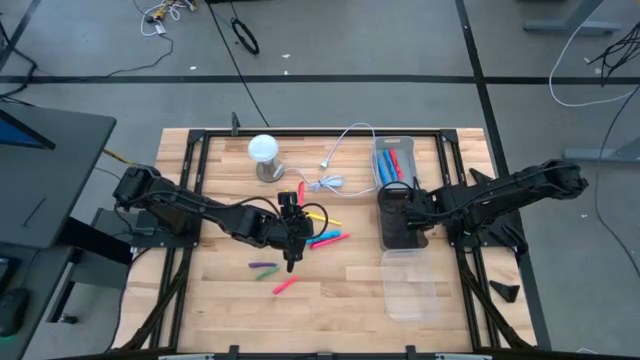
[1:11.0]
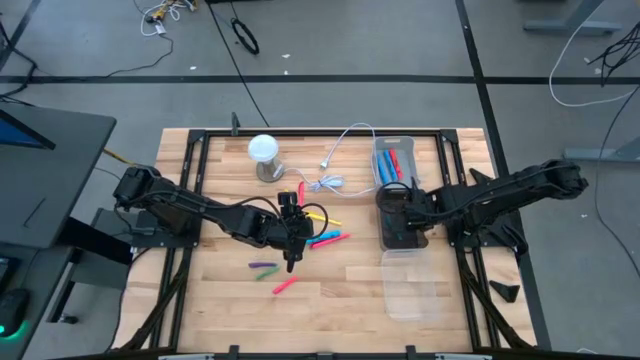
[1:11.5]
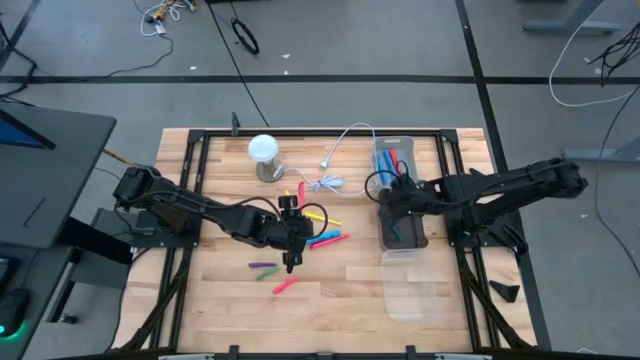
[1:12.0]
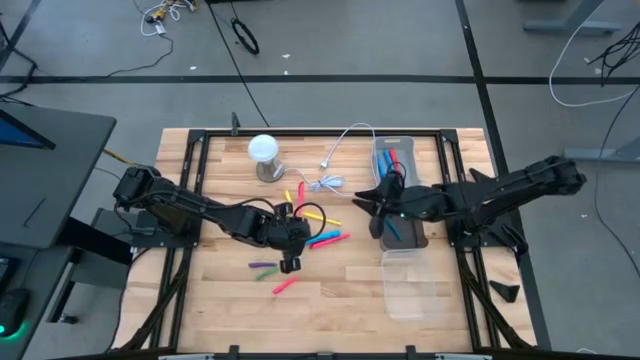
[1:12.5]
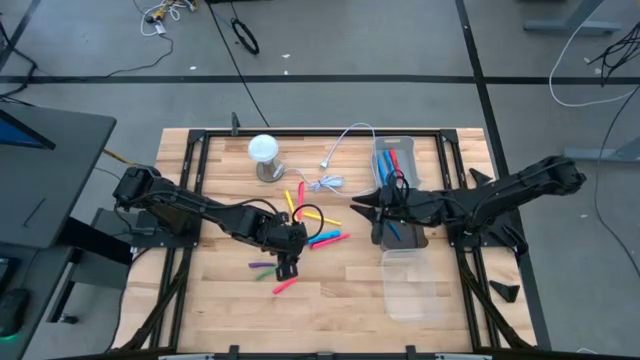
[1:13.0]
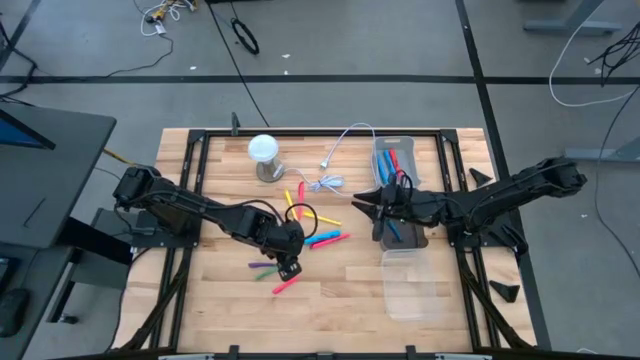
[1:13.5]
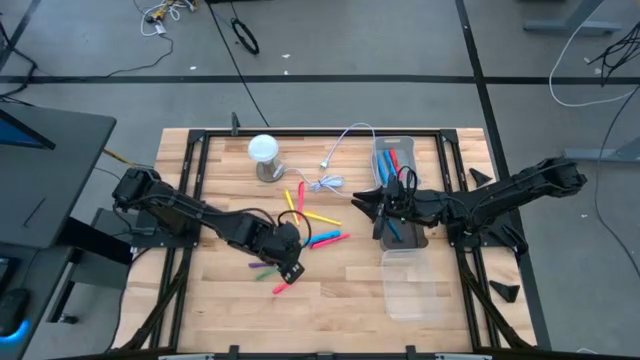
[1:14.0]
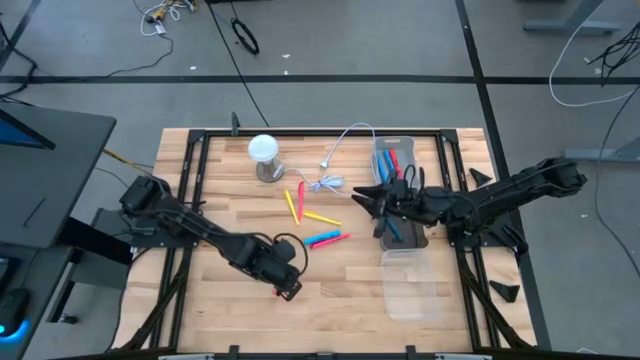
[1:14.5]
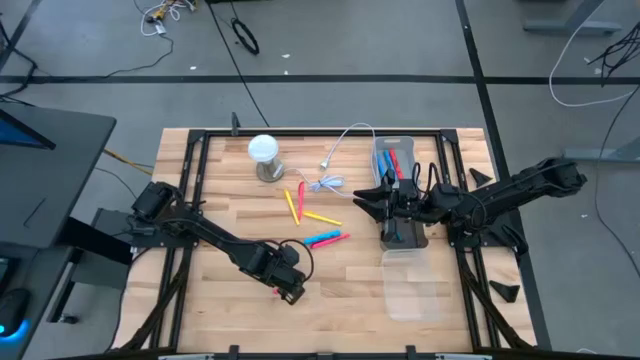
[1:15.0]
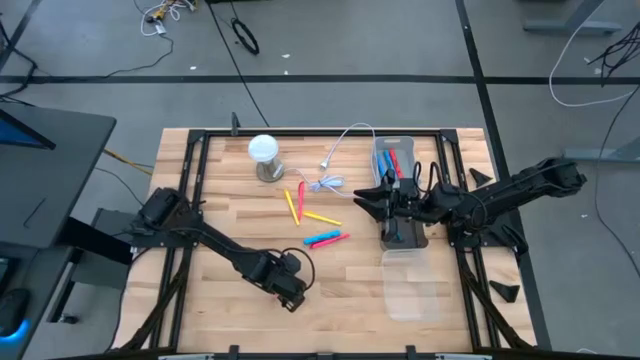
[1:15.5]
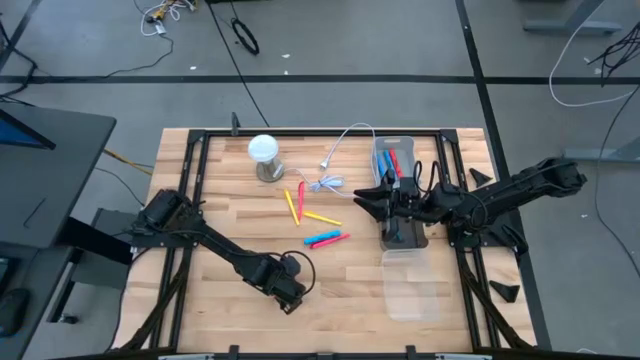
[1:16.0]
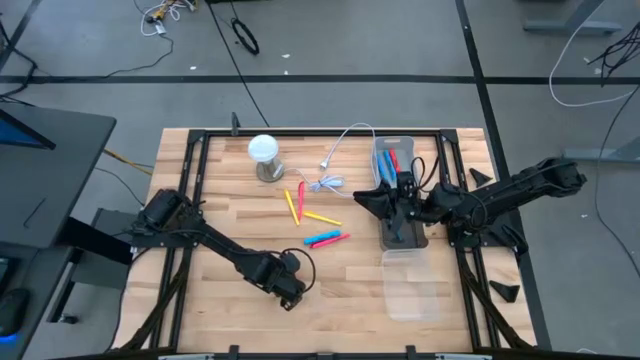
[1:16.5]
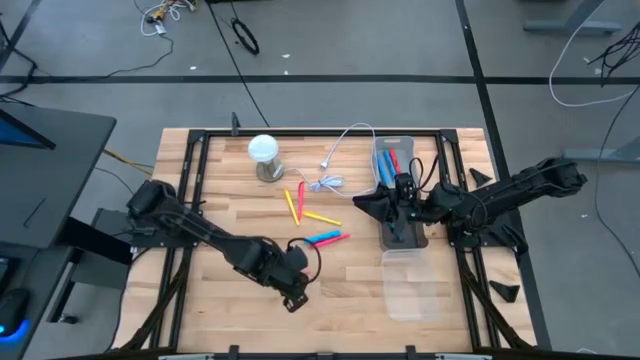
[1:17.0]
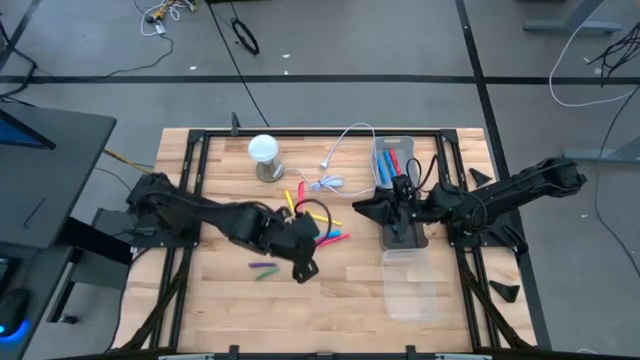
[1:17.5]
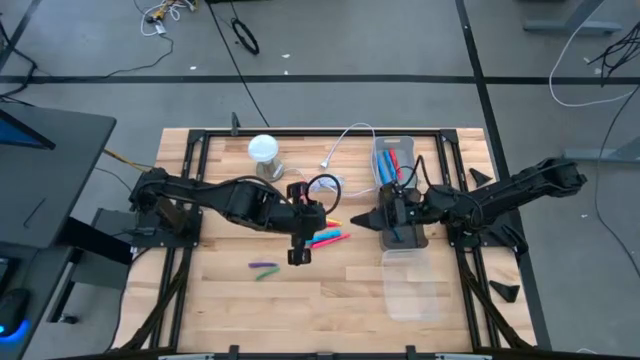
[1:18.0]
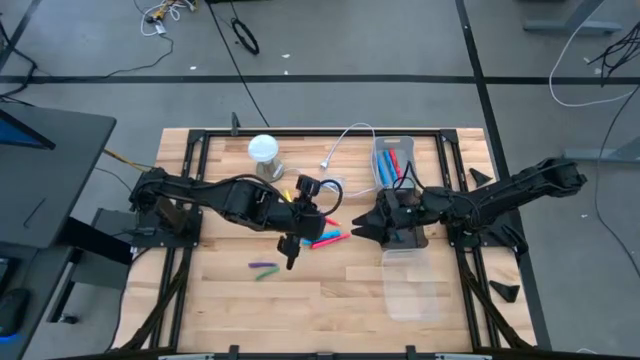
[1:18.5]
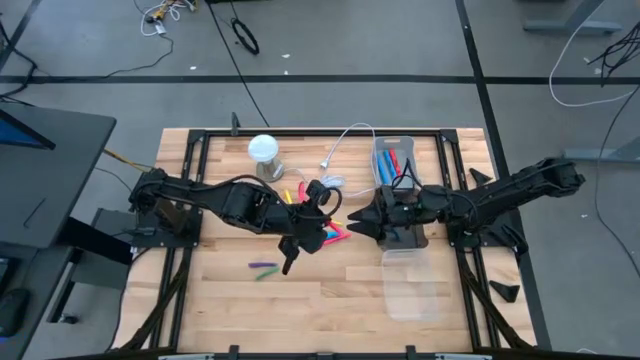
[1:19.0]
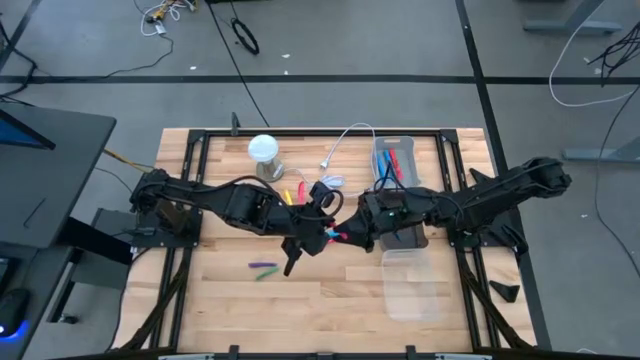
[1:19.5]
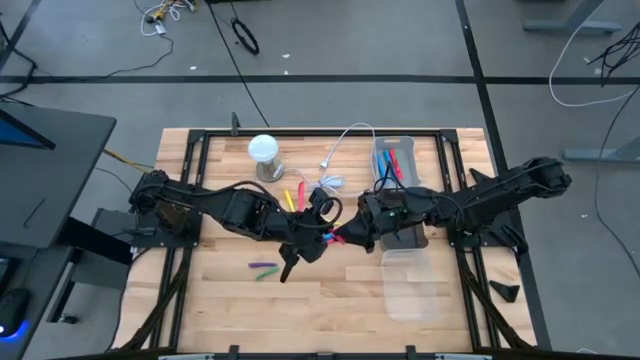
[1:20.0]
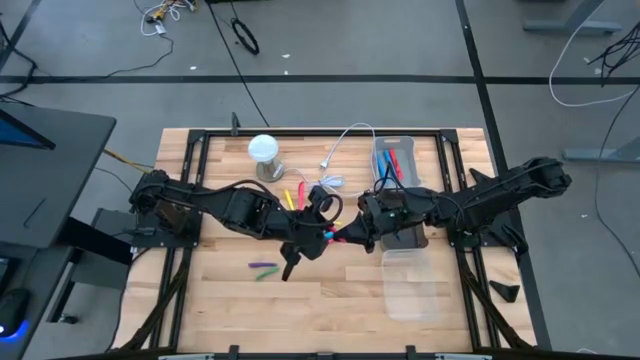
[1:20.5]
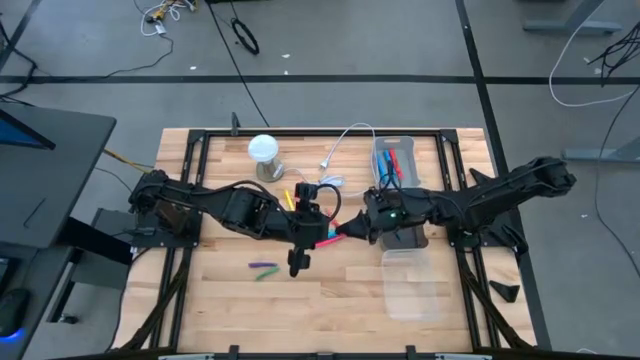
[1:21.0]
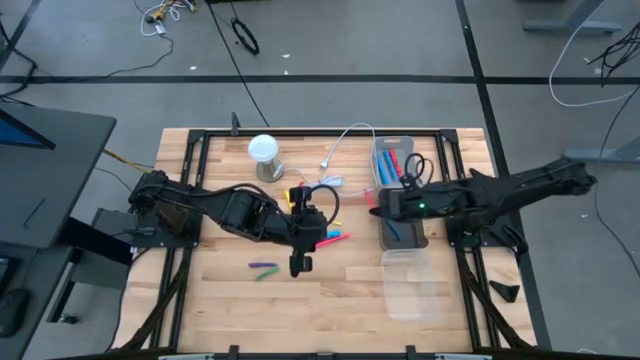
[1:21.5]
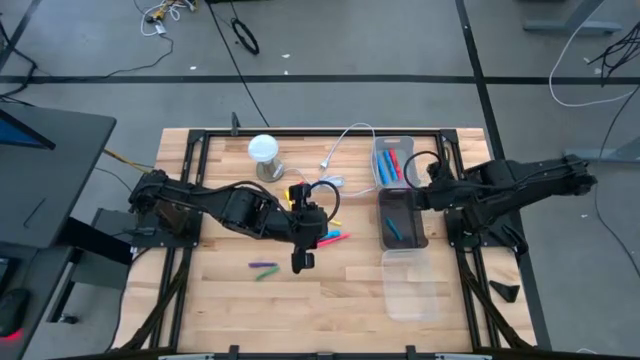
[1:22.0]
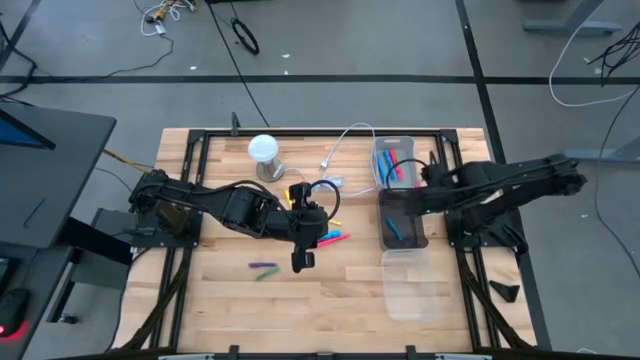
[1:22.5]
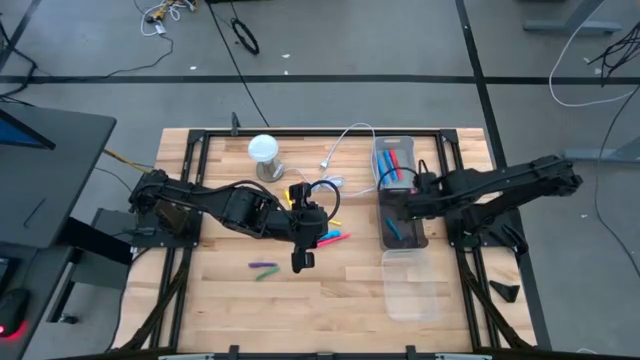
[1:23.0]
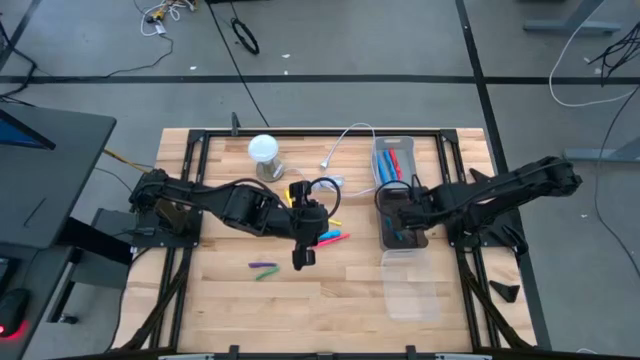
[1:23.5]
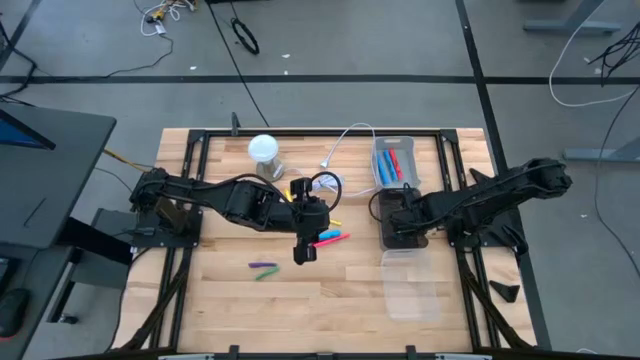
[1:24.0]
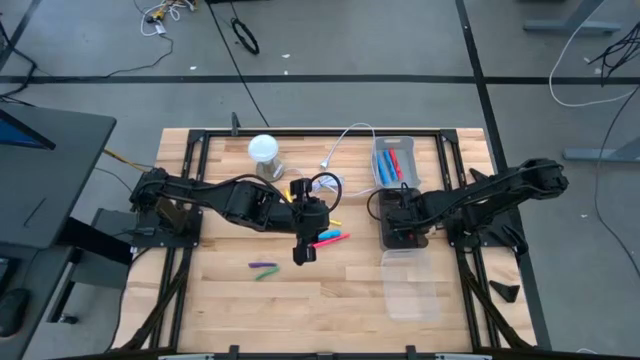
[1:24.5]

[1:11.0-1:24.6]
Task: Pick & Place Markers
Put the pink mini marker into the black bin
